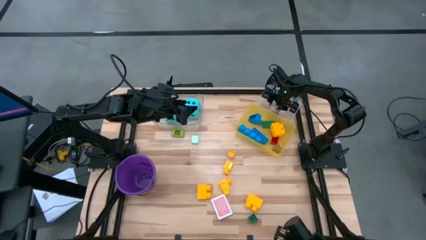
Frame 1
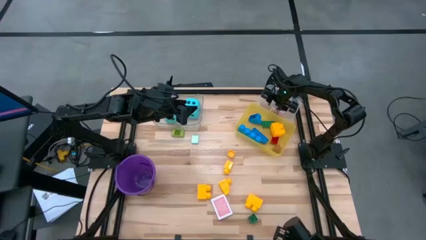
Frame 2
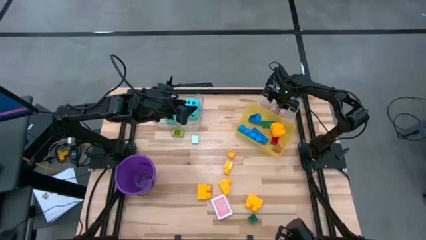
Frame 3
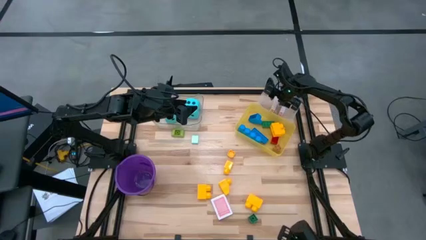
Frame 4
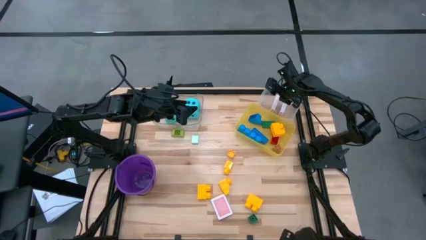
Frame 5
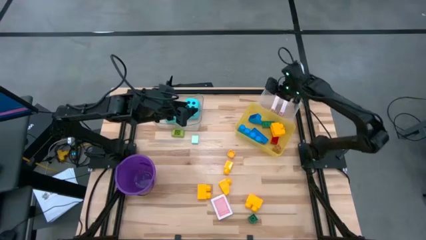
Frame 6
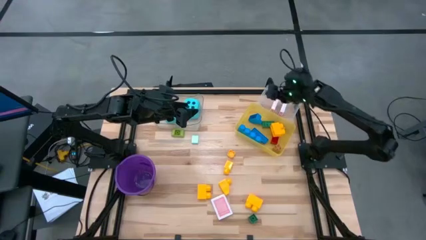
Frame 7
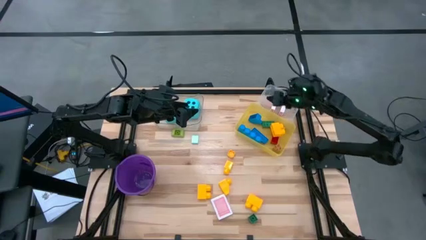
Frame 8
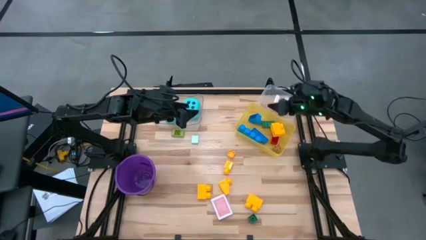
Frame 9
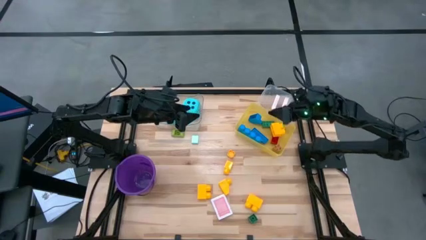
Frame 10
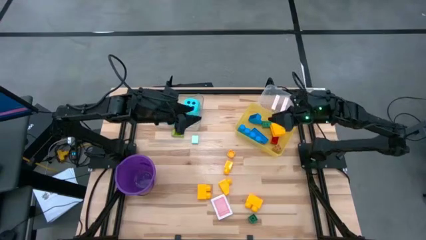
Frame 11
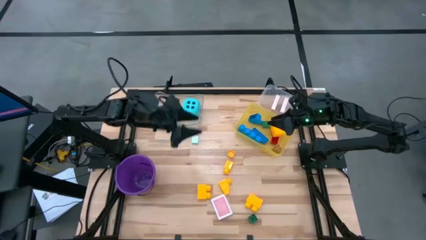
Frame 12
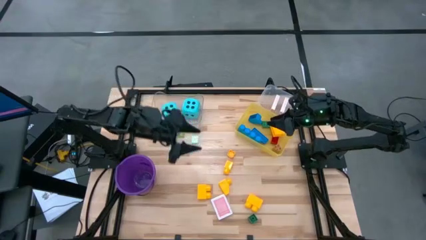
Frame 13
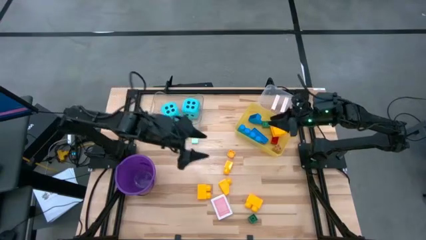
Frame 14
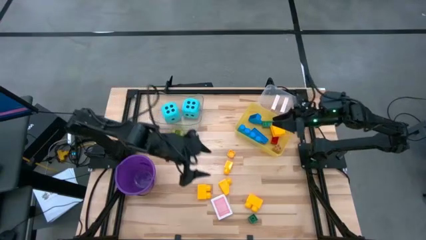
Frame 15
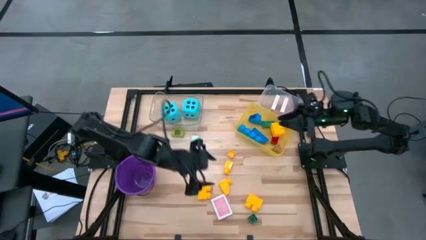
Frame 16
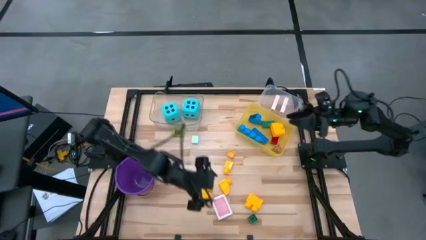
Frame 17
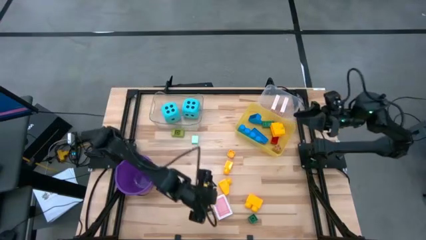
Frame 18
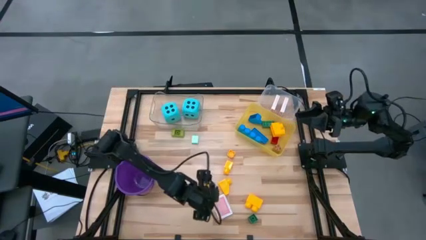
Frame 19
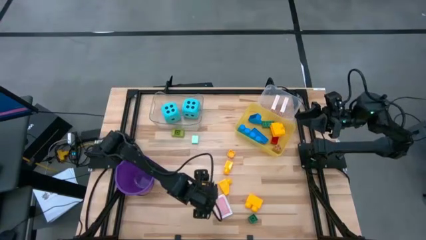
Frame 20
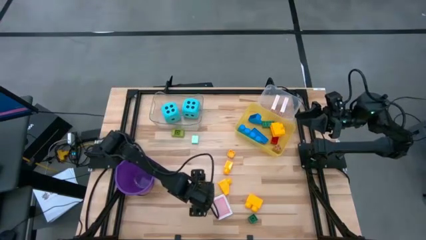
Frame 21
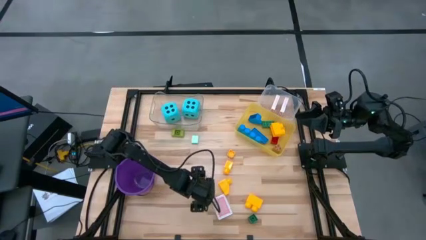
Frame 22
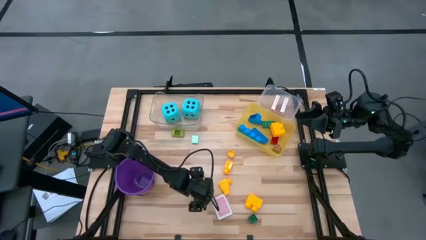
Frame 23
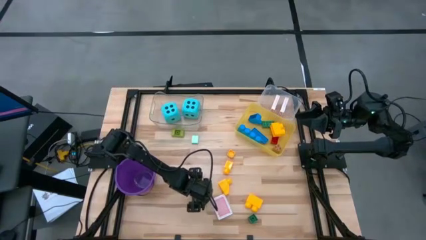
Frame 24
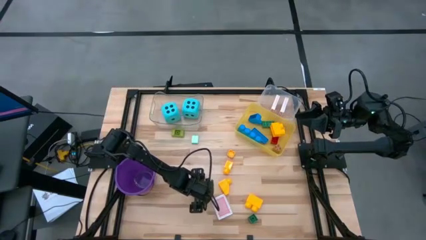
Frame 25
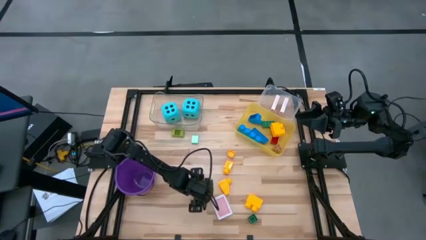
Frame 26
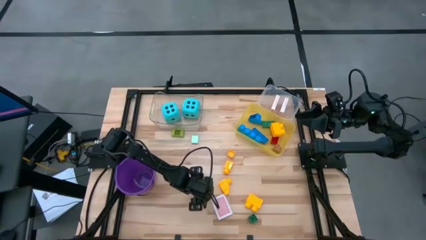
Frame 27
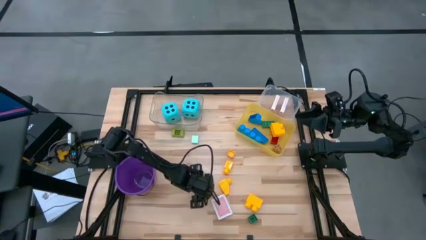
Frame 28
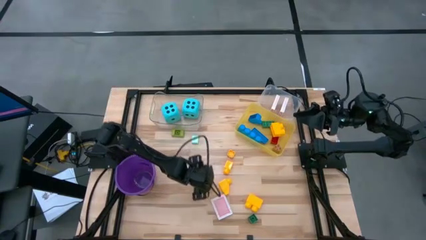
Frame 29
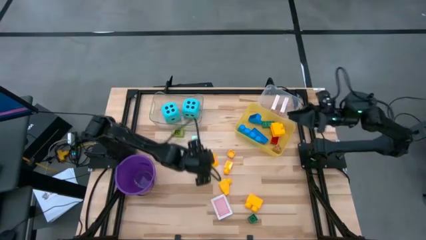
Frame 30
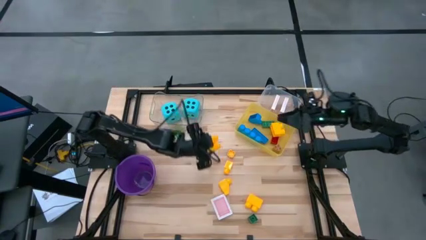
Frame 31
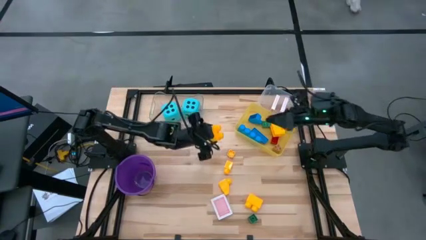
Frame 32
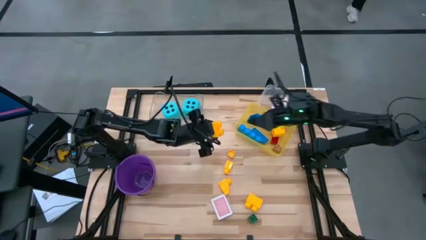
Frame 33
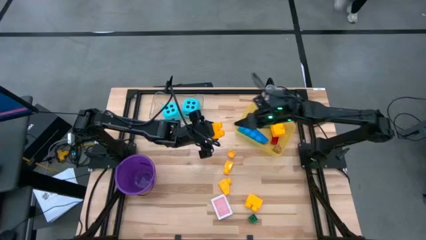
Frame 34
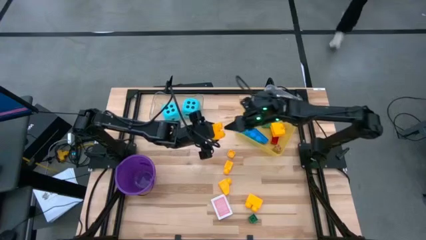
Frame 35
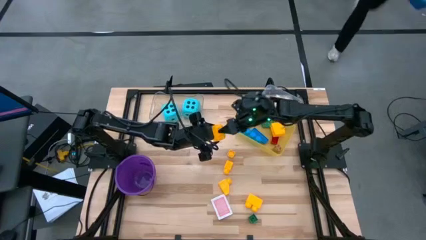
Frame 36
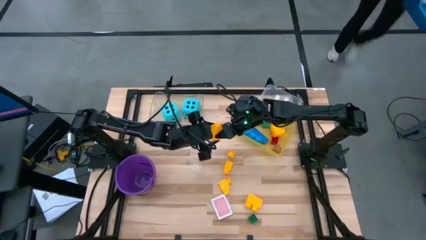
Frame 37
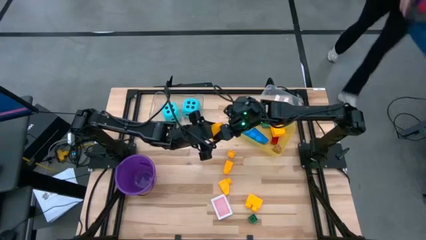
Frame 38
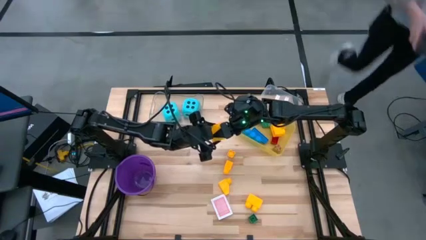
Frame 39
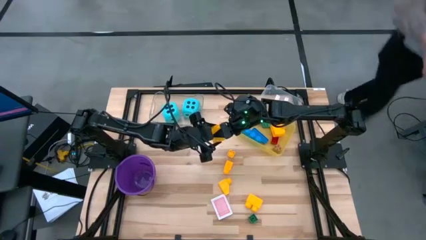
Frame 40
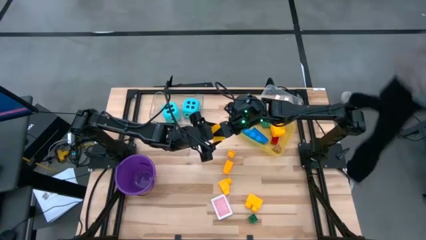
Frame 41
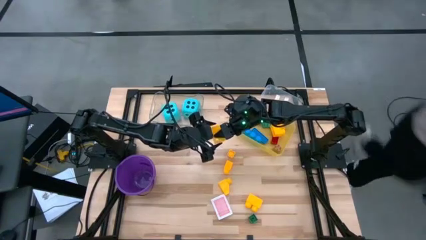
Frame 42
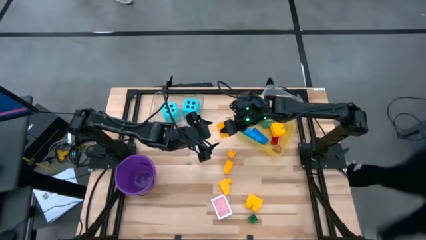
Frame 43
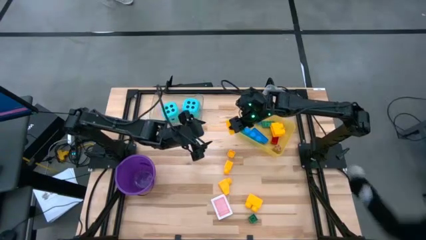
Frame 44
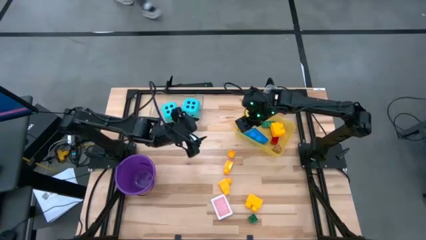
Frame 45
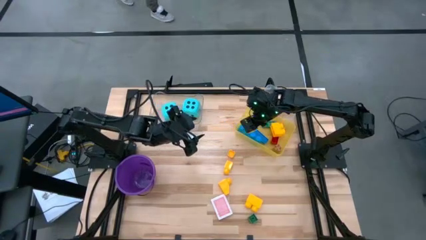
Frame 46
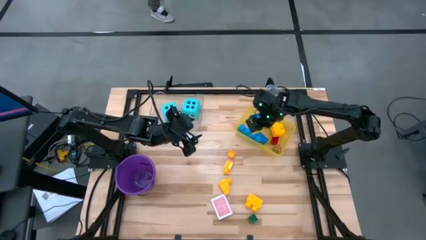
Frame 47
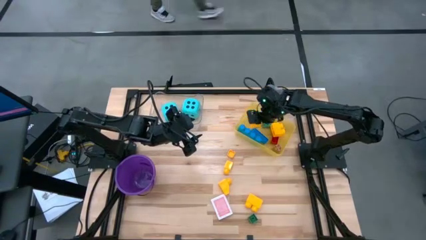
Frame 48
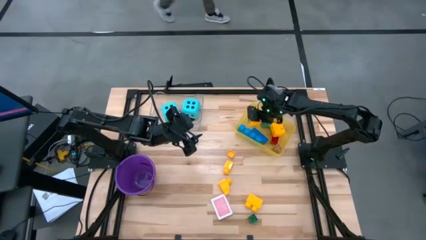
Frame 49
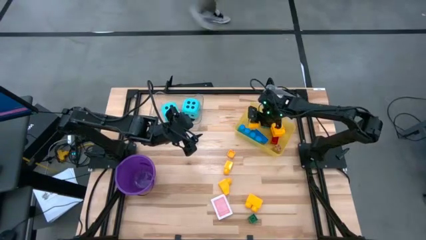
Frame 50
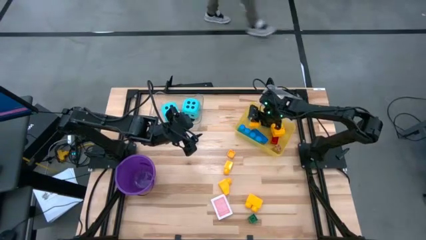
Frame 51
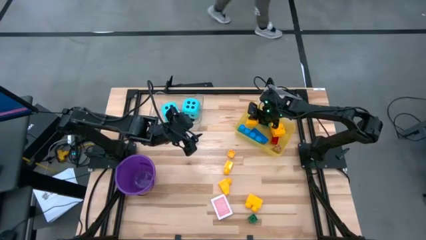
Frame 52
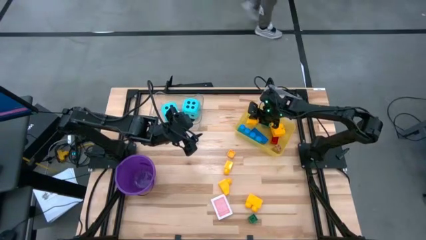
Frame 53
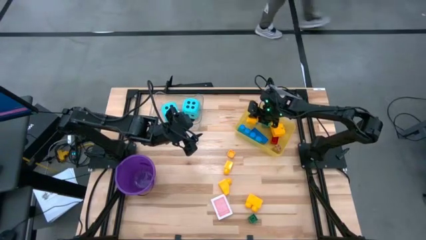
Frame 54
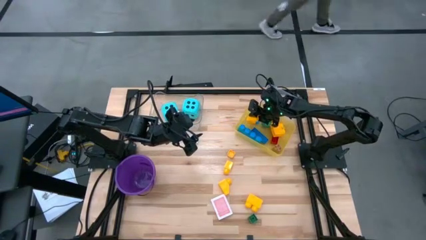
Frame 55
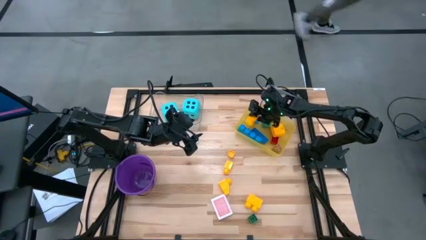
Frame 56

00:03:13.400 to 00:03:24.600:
Task: Pick & Place Toys
Put the yellow game piece into the yellow bin
